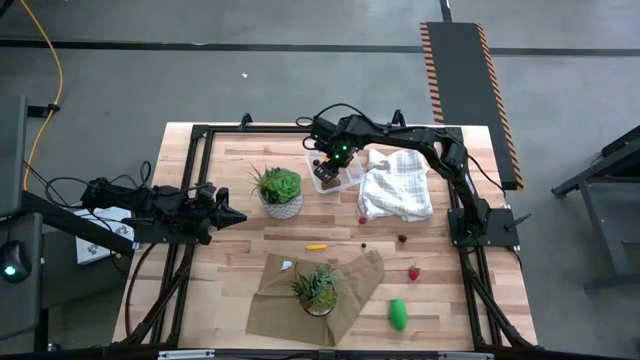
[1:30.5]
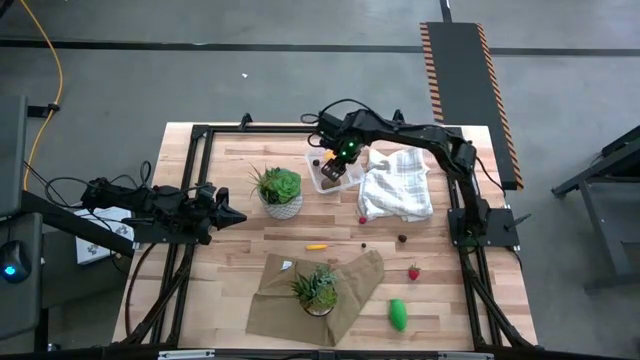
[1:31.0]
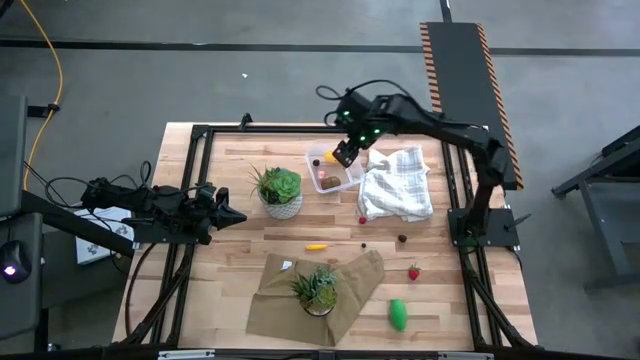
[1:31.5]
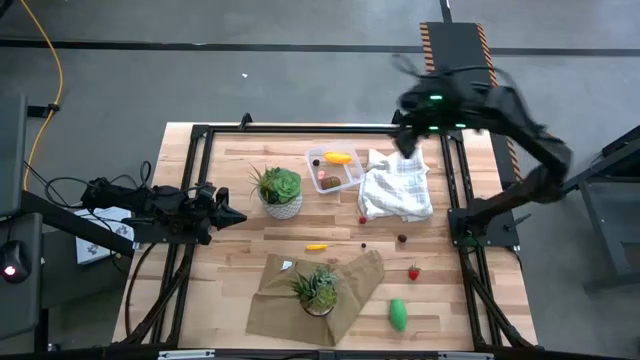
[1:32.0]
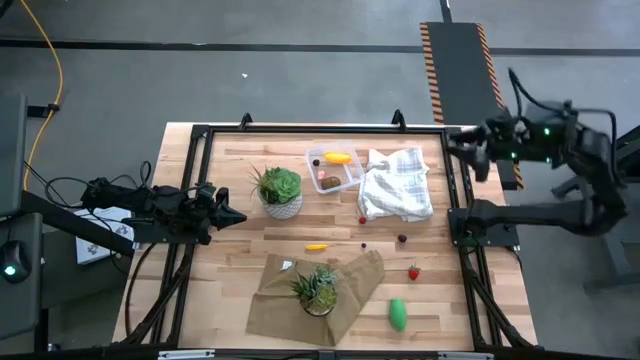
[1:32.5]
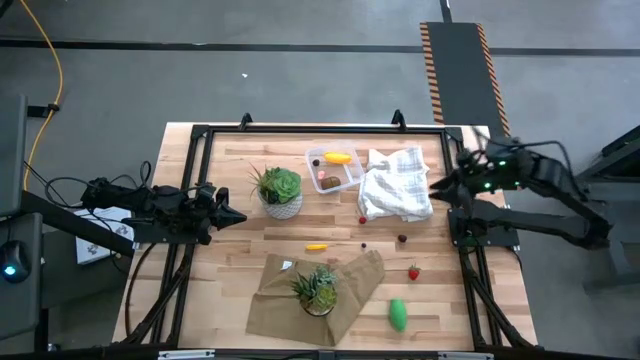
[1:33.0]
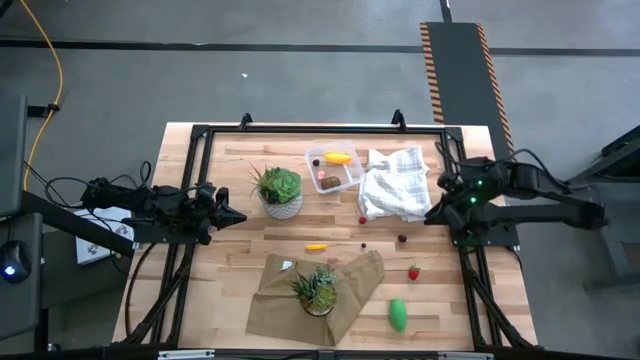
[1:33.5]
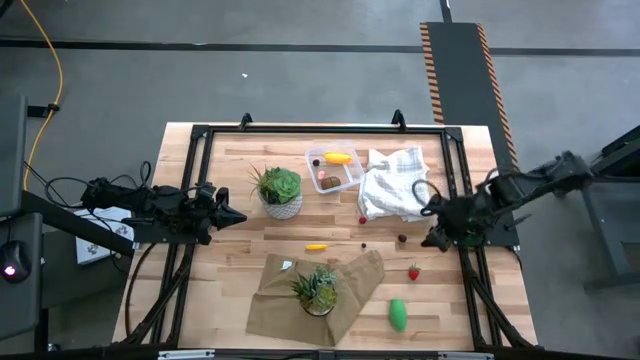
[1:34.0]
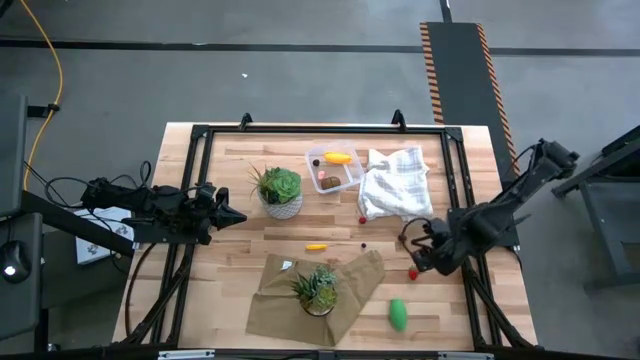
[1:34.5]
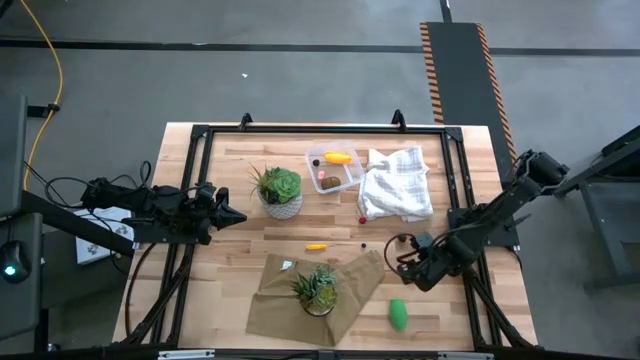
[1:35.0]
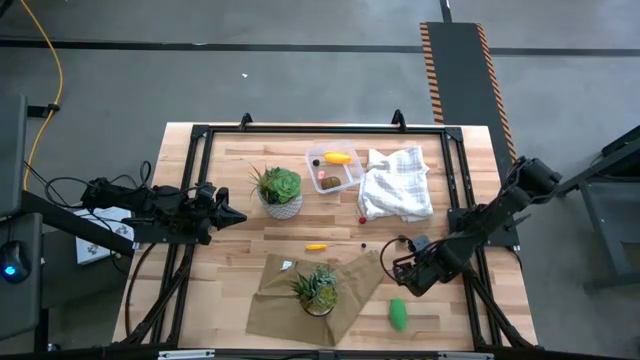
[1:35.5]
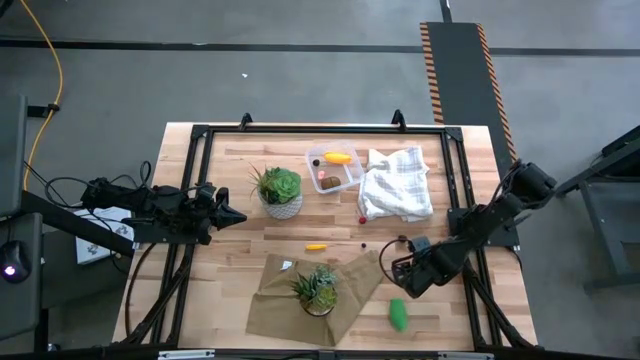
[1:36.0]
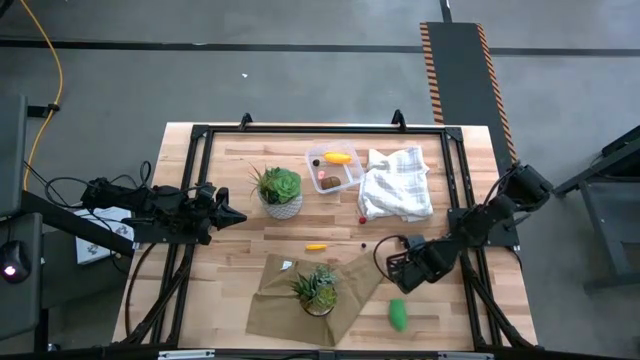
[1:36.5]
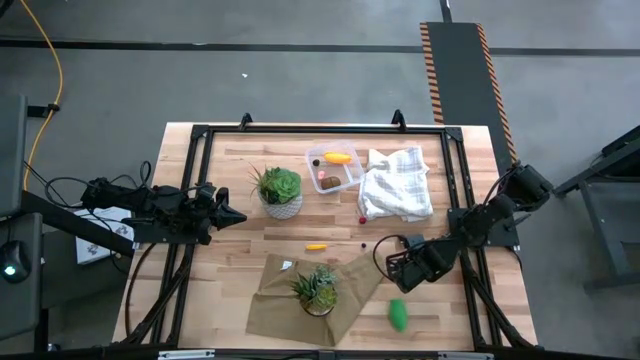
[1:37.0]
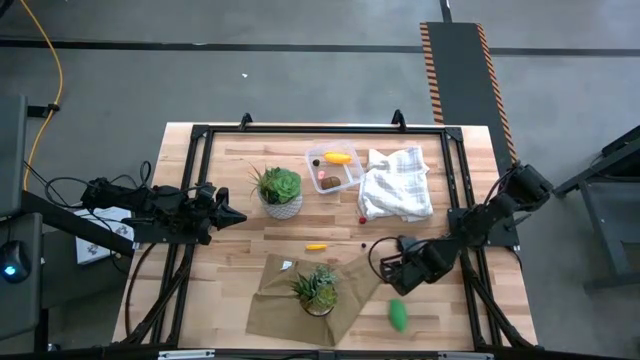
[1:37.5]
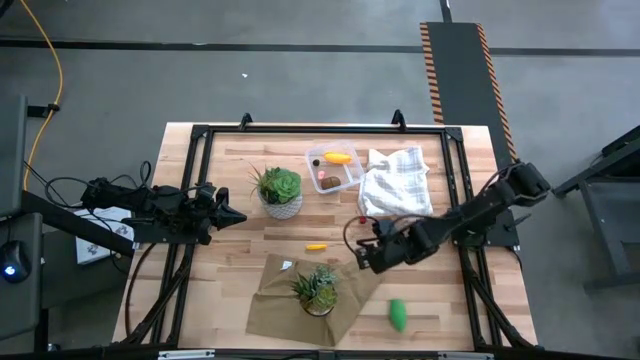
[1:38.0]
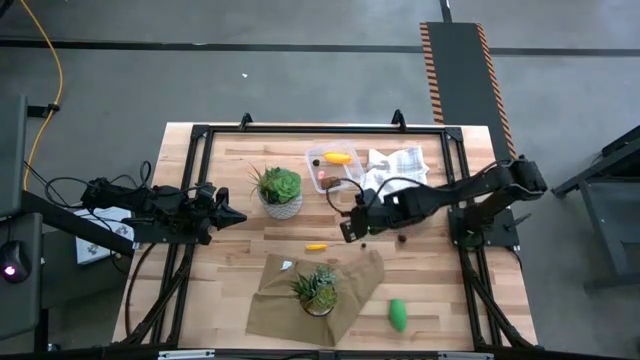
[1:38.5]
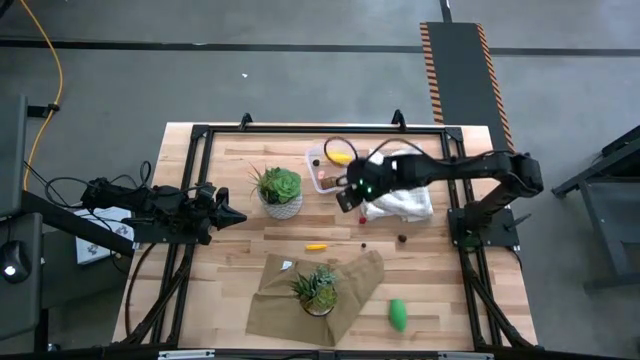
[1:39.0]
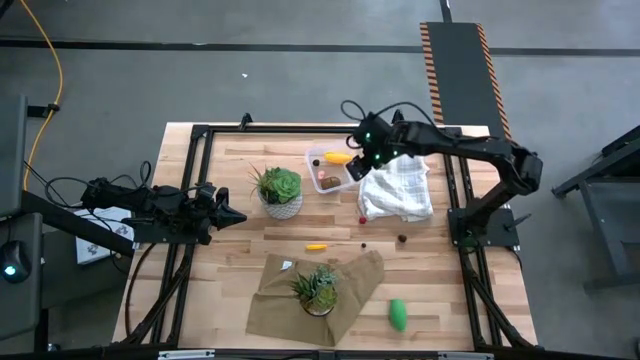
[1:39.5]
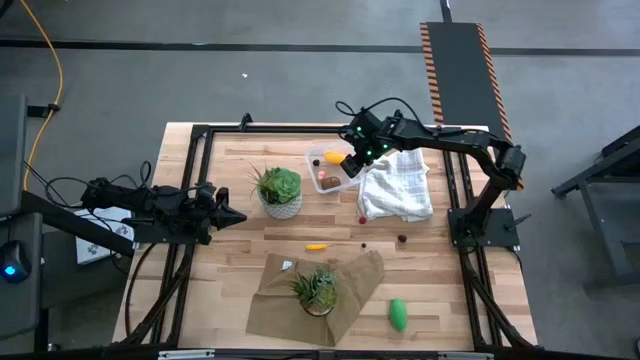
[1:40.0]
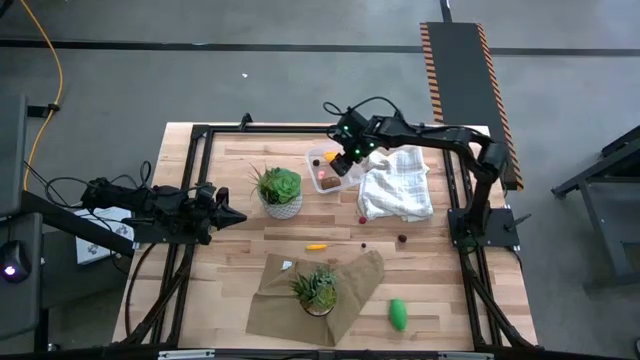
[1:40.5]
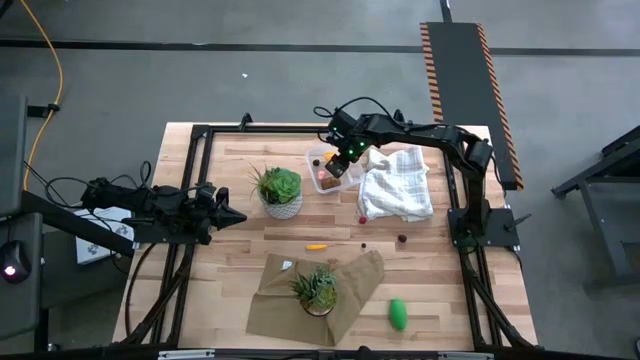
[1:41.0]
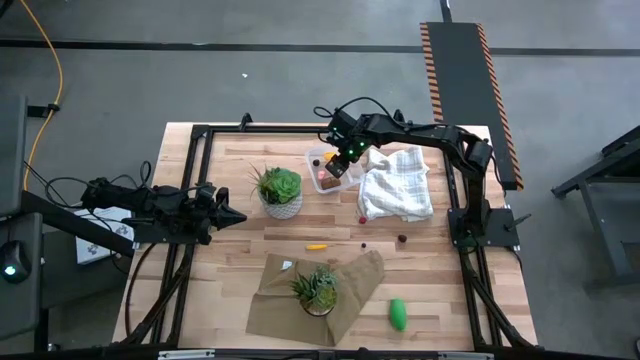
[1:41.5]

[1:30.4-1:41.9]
Task: Pick and placing Produce into tupperware
Put the red strawberry into the transparent bin

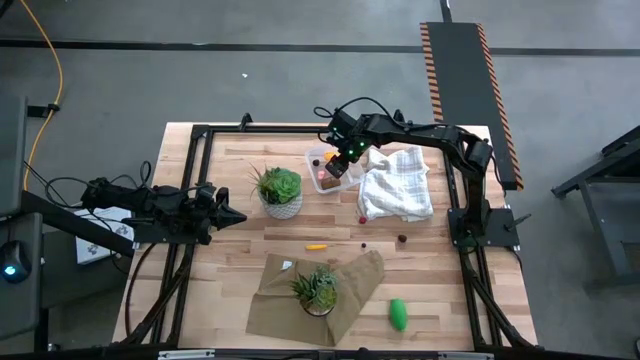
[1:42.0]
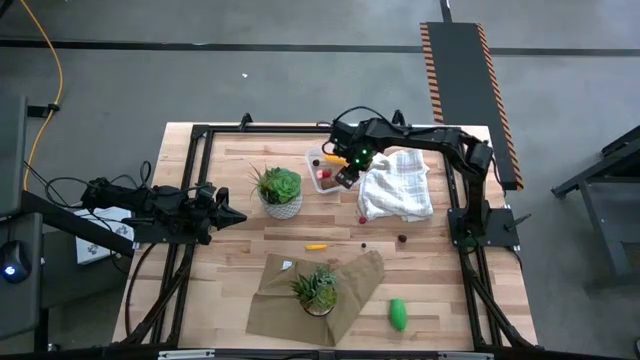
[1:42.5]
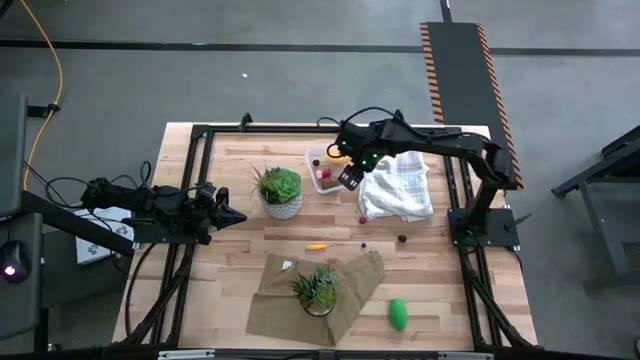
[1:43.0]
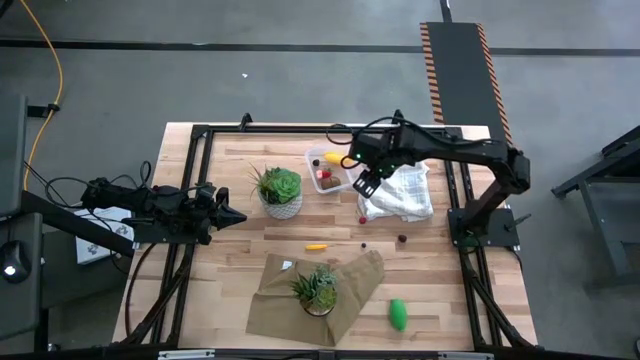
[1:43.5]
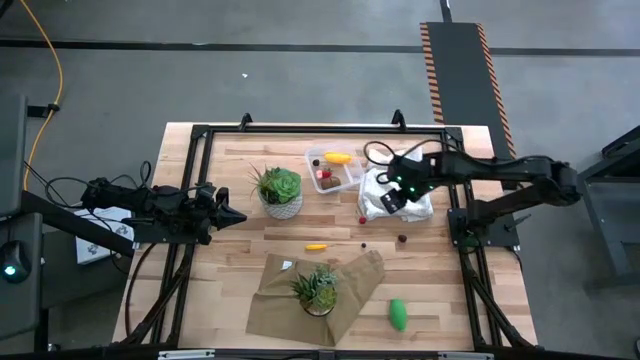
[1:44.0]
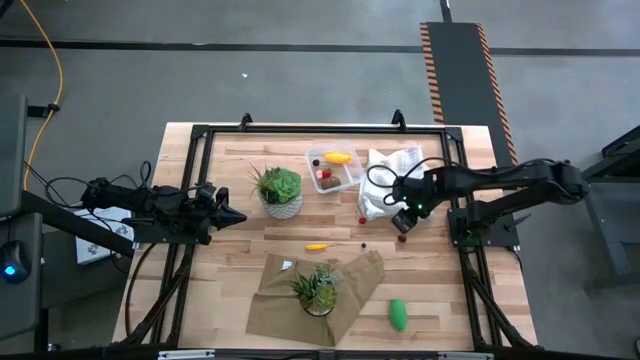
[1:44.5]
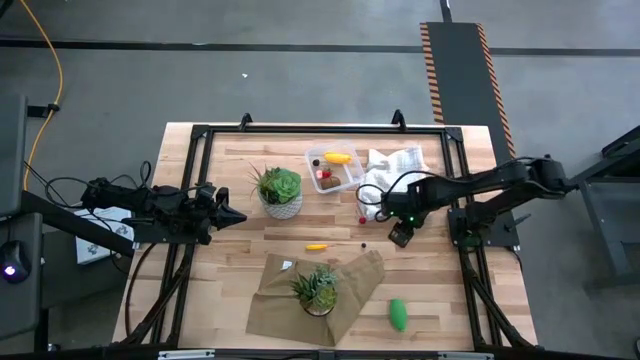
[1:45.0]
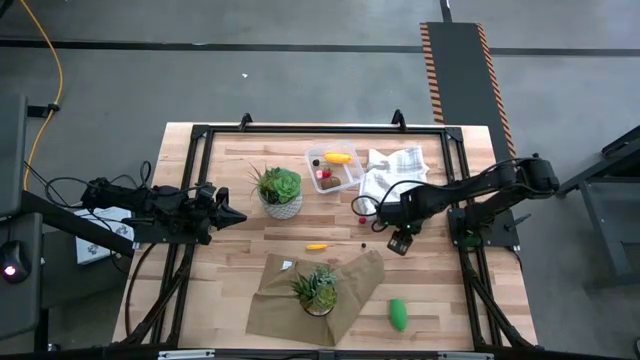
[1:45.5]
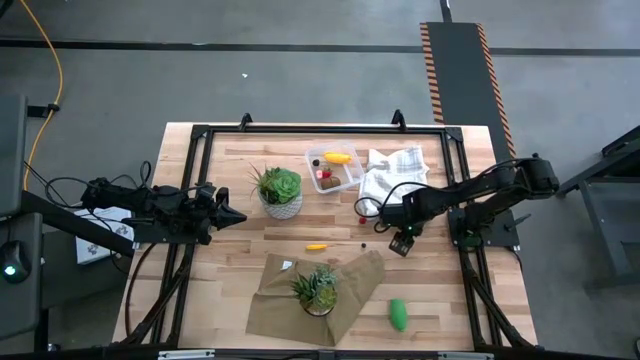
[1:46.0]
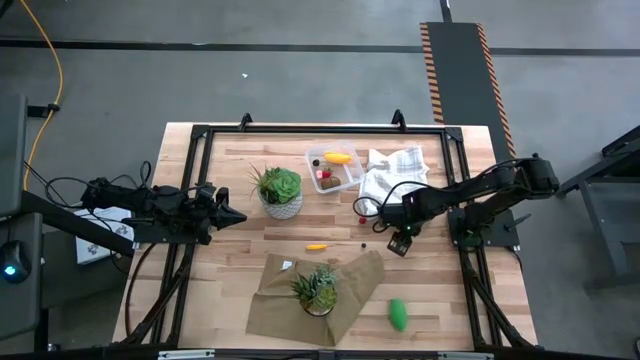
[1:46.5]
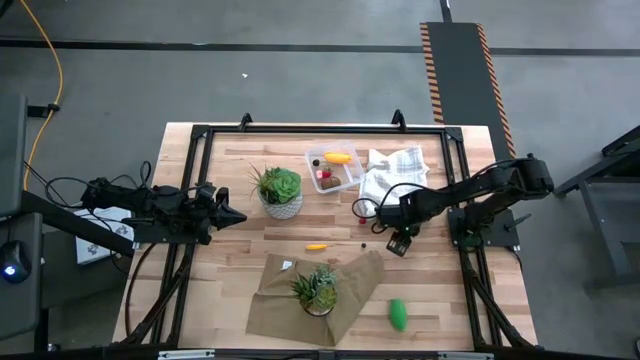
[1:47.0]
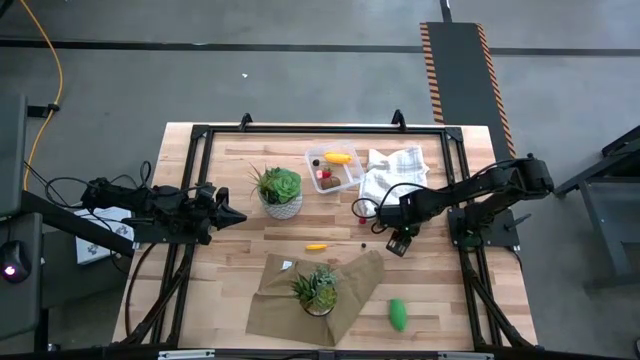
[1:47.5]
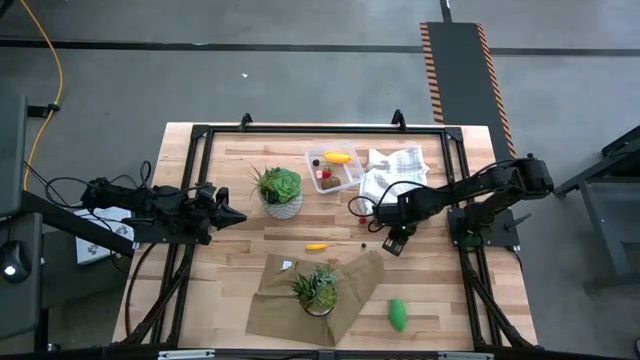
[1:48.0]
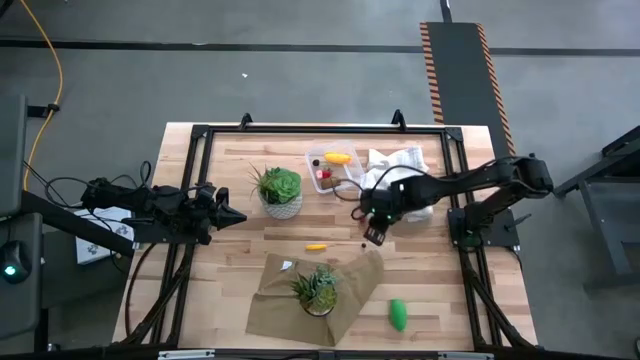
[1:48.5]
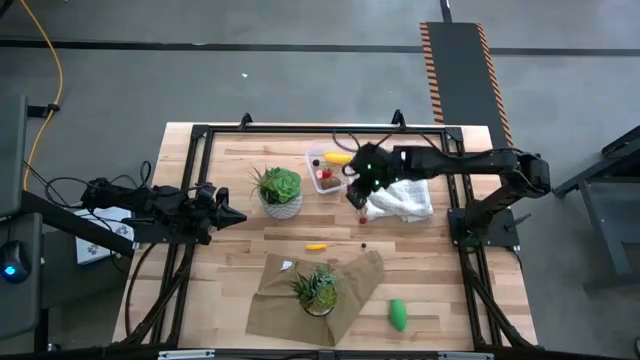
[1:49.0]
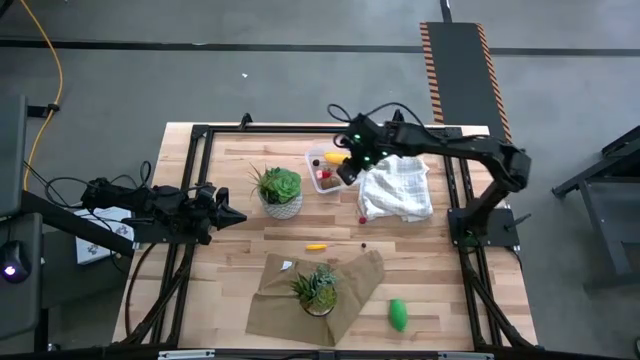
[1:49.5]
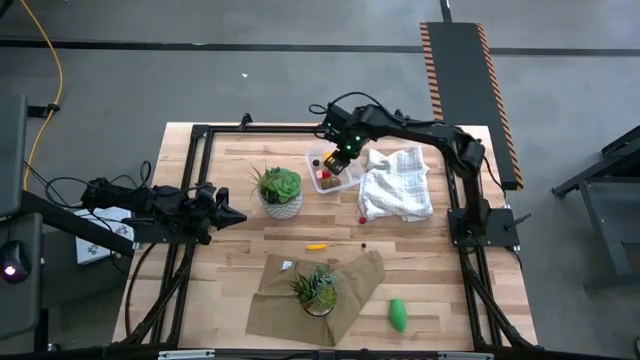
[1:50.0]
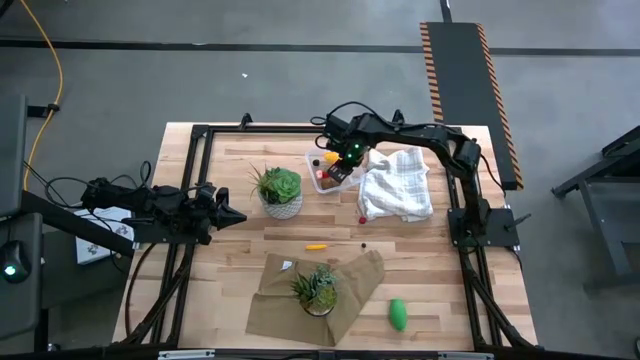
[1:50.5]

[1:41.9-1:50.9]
Put the blackberry into the transparent bin
